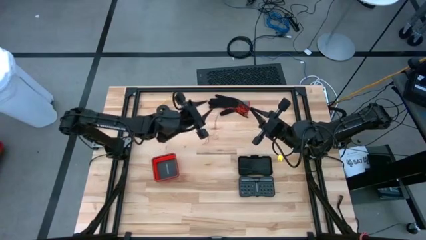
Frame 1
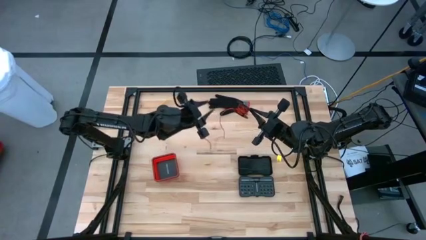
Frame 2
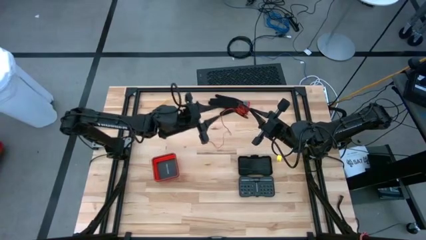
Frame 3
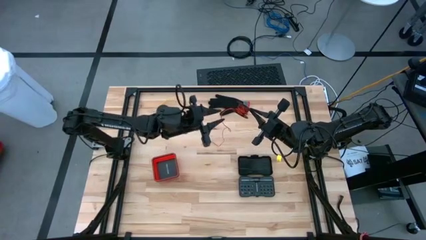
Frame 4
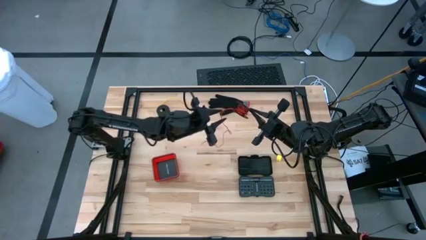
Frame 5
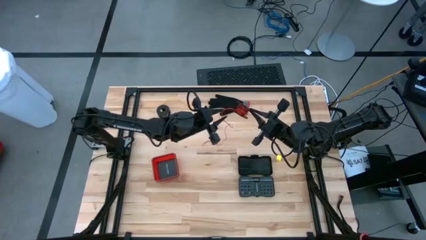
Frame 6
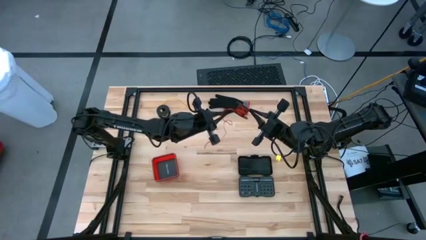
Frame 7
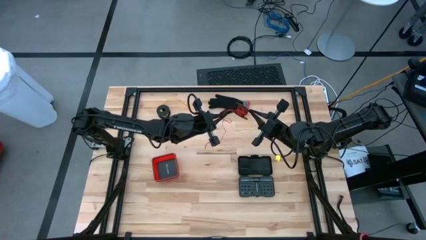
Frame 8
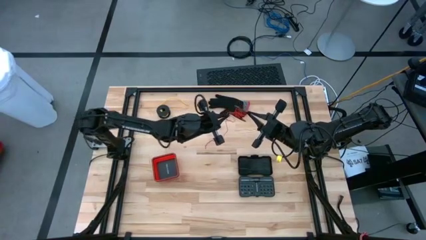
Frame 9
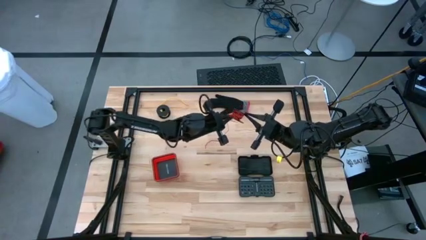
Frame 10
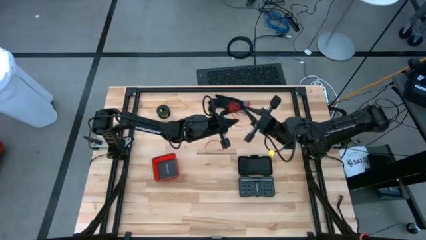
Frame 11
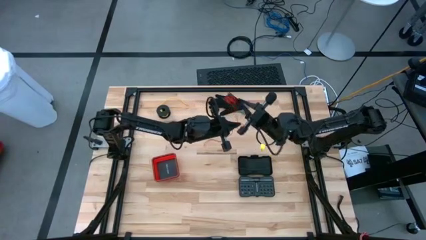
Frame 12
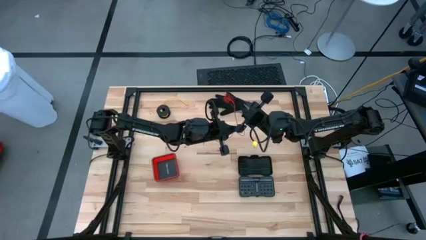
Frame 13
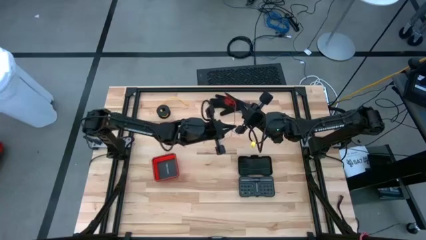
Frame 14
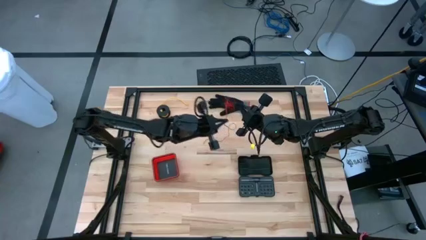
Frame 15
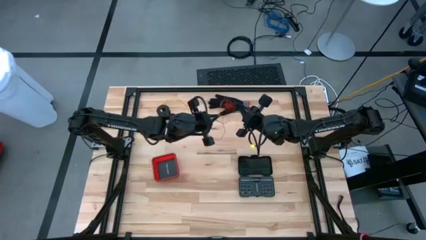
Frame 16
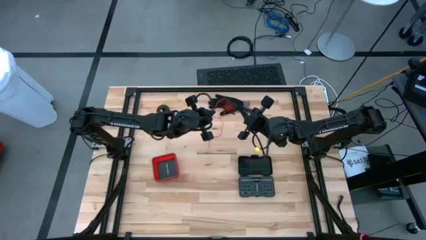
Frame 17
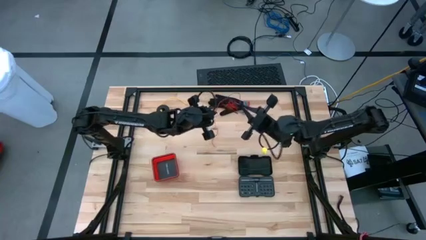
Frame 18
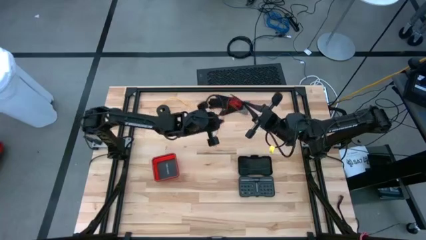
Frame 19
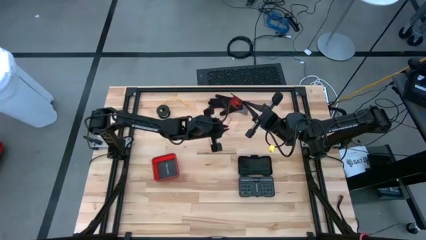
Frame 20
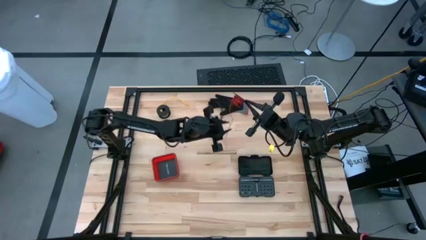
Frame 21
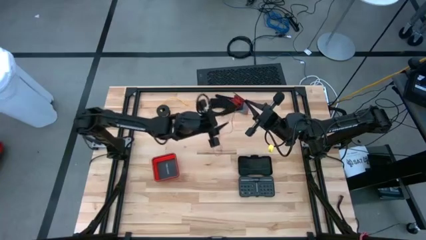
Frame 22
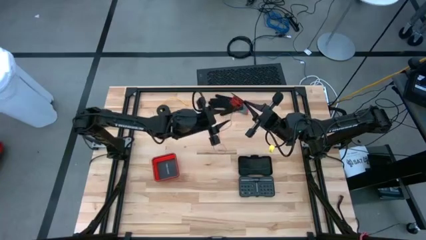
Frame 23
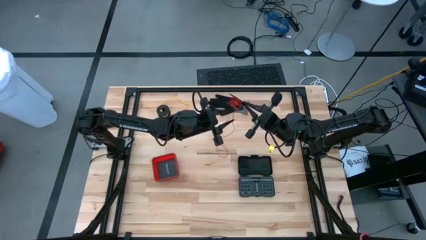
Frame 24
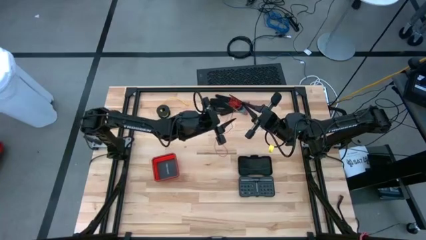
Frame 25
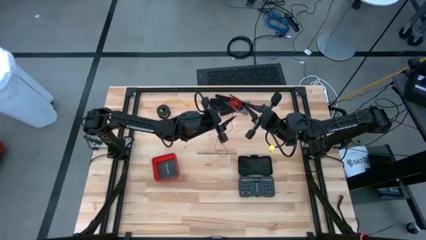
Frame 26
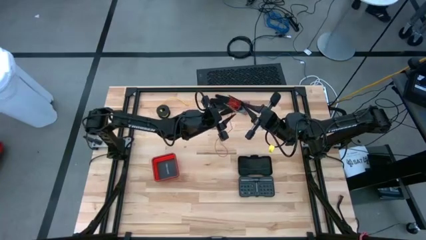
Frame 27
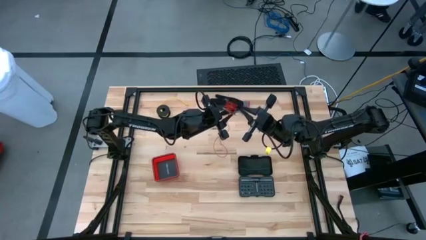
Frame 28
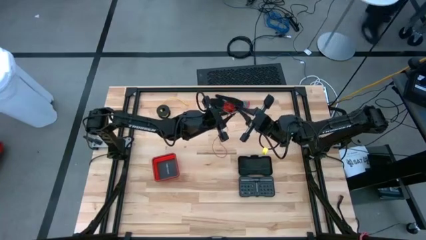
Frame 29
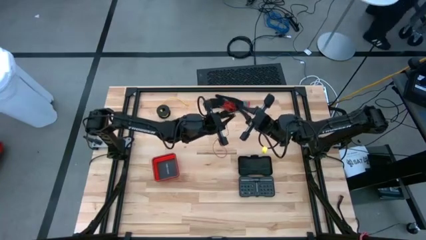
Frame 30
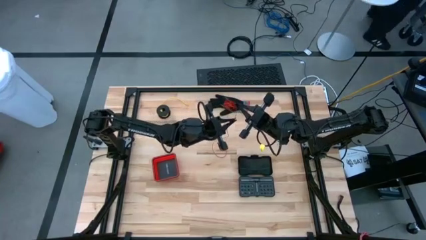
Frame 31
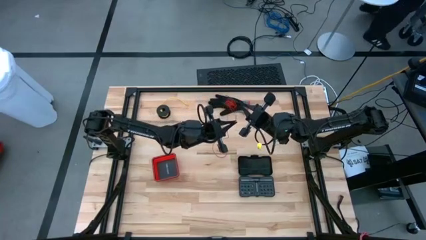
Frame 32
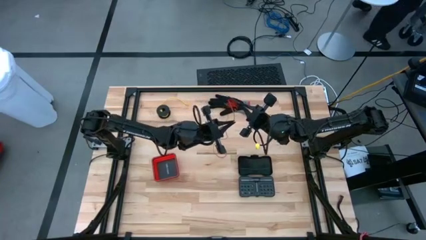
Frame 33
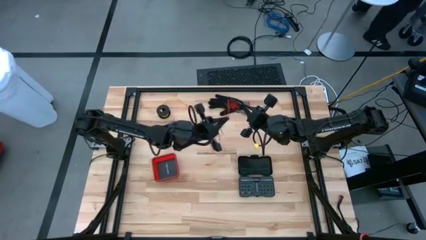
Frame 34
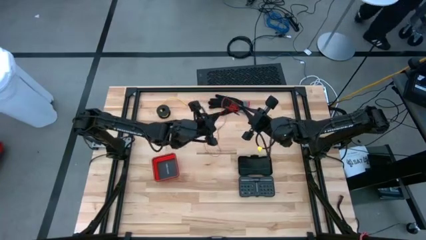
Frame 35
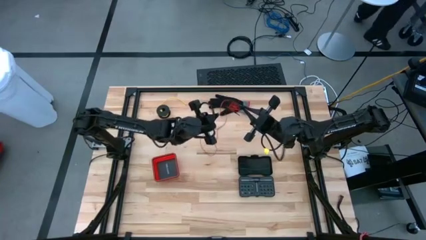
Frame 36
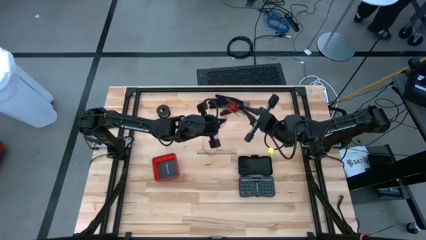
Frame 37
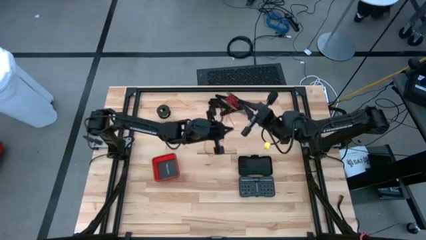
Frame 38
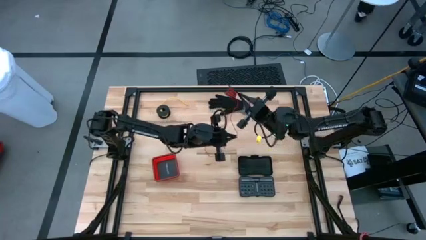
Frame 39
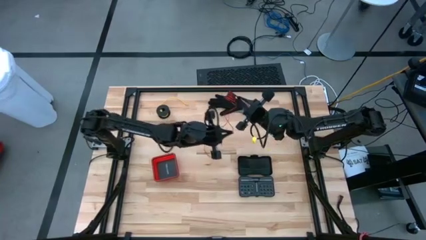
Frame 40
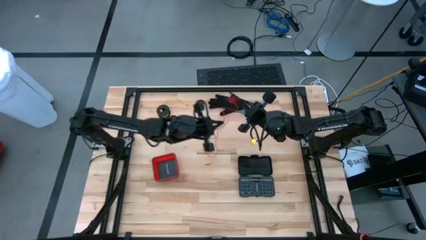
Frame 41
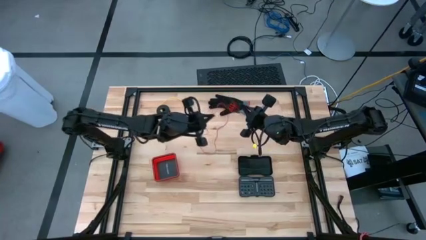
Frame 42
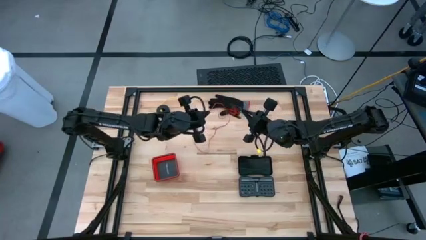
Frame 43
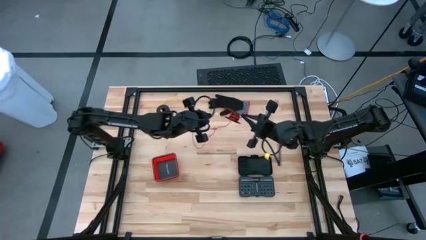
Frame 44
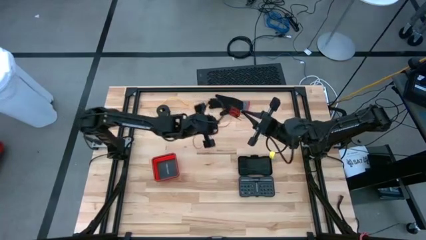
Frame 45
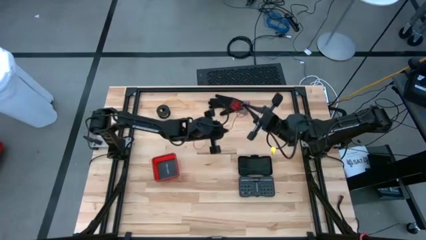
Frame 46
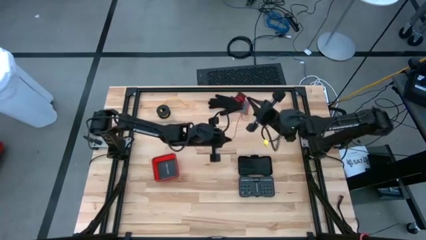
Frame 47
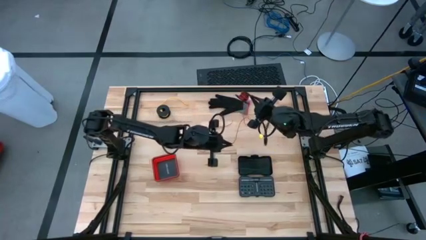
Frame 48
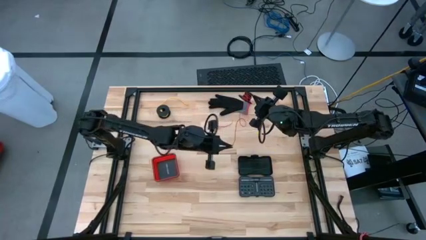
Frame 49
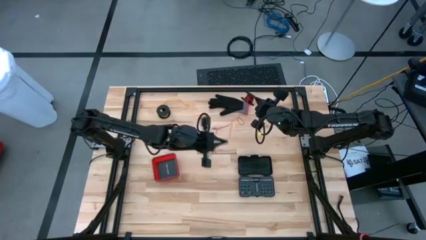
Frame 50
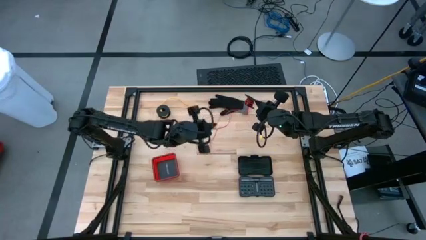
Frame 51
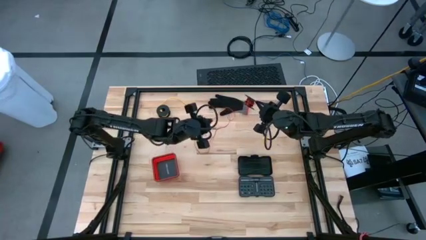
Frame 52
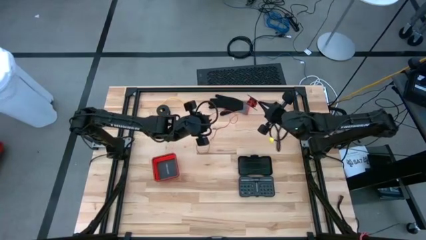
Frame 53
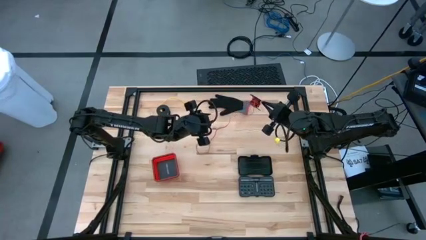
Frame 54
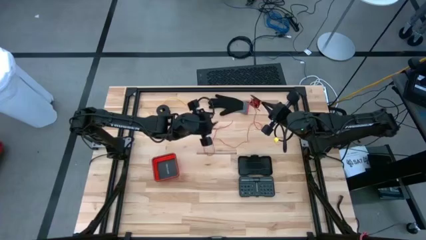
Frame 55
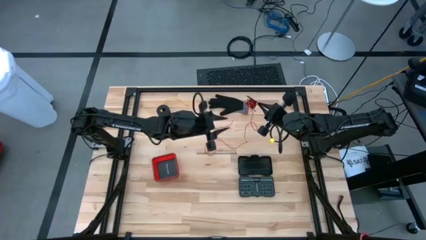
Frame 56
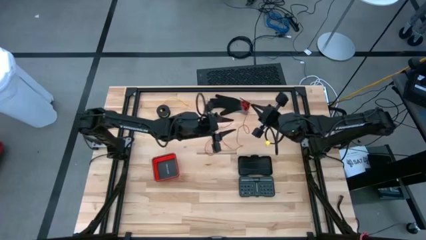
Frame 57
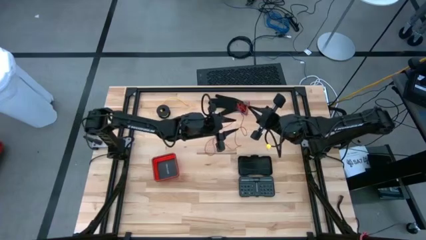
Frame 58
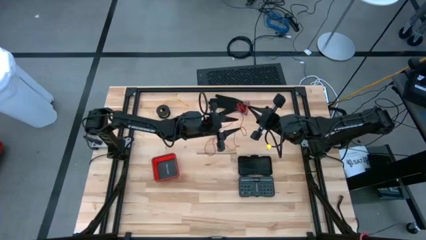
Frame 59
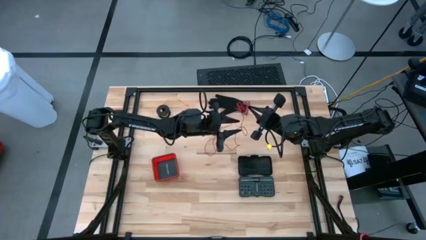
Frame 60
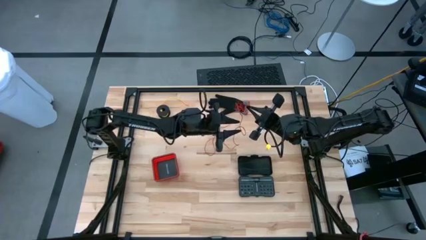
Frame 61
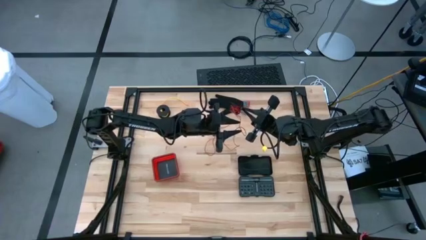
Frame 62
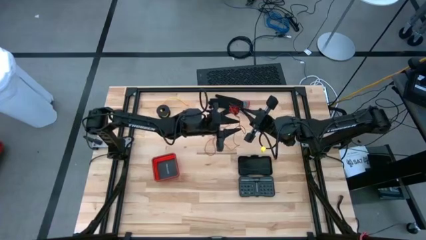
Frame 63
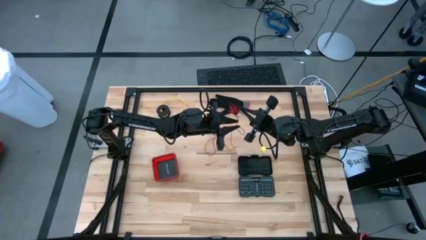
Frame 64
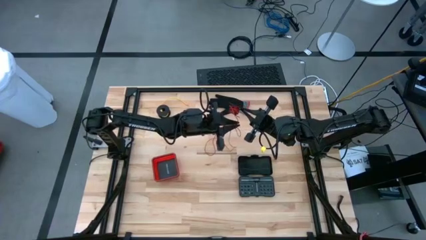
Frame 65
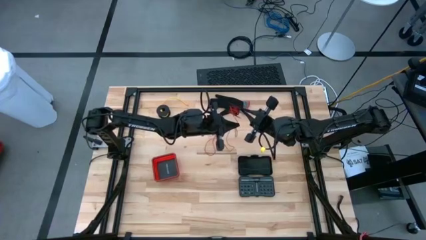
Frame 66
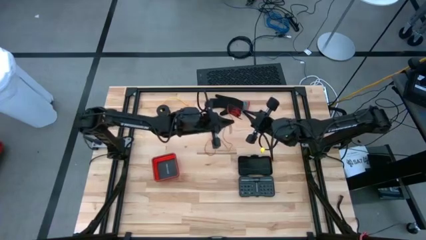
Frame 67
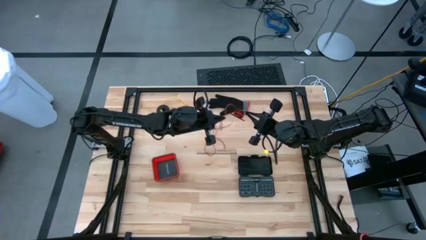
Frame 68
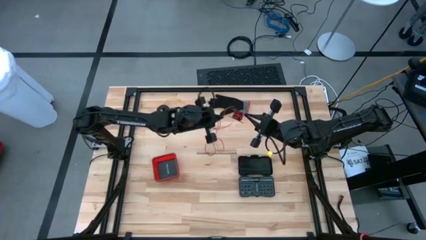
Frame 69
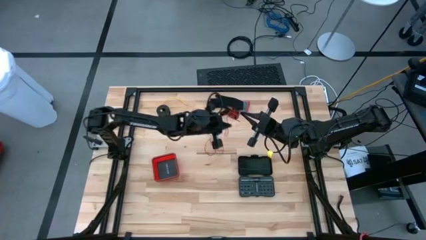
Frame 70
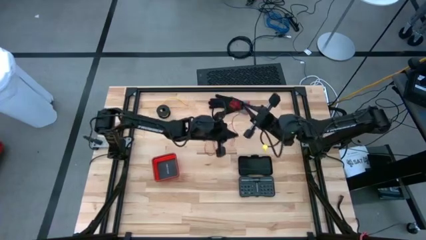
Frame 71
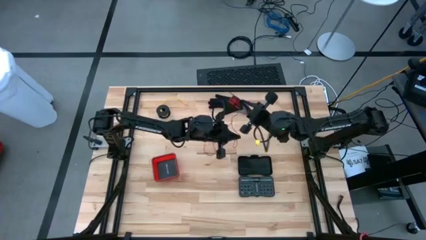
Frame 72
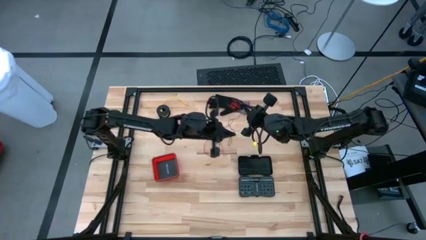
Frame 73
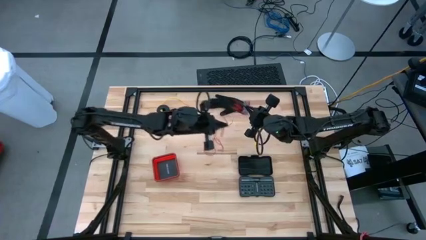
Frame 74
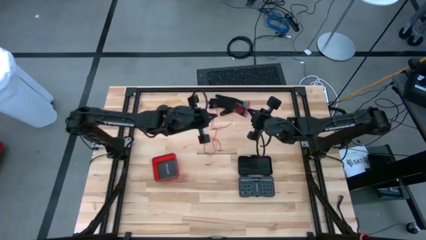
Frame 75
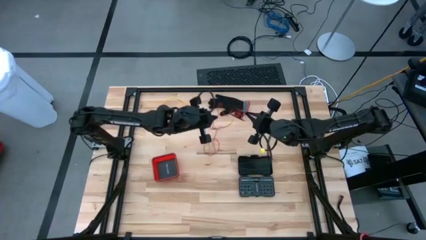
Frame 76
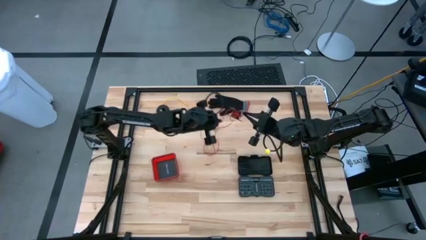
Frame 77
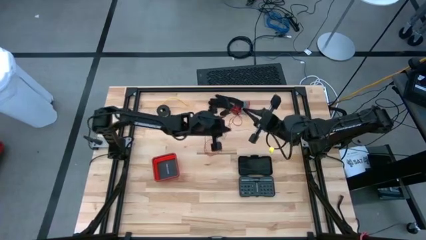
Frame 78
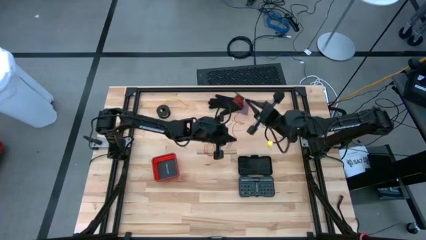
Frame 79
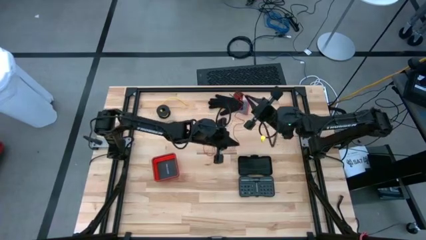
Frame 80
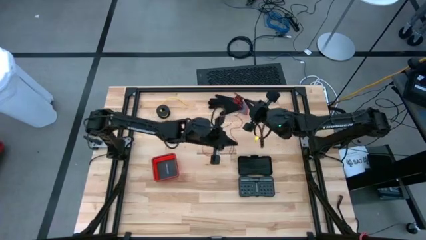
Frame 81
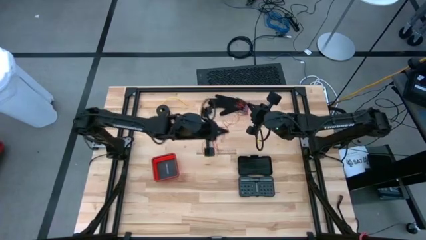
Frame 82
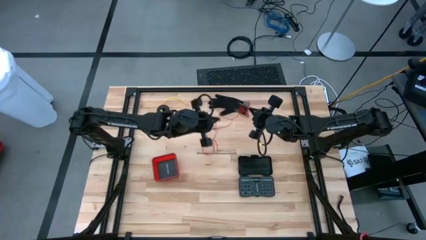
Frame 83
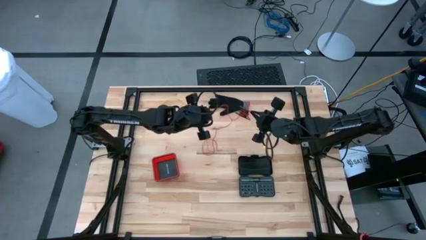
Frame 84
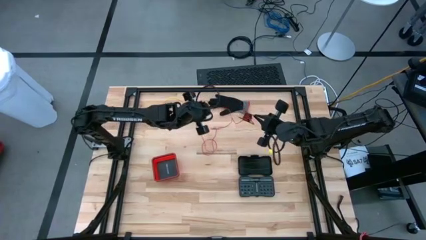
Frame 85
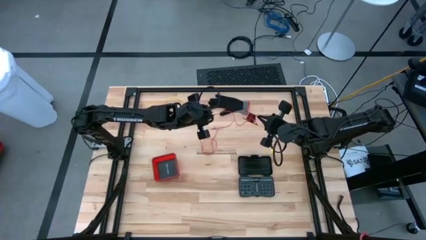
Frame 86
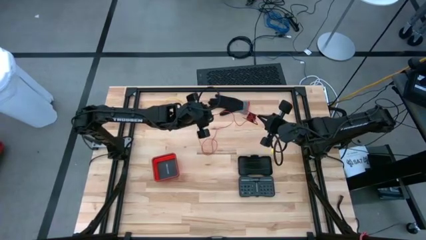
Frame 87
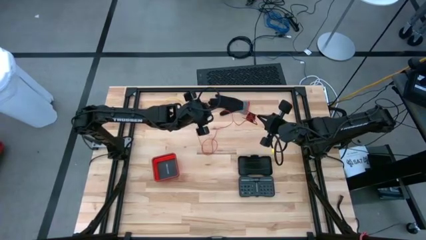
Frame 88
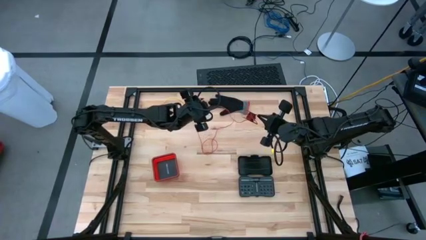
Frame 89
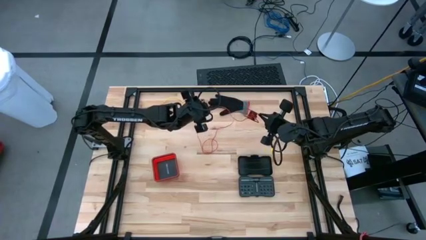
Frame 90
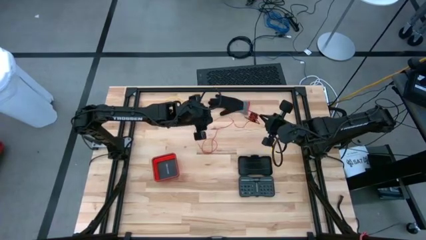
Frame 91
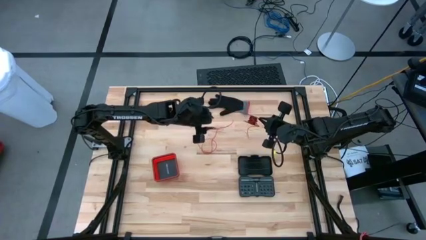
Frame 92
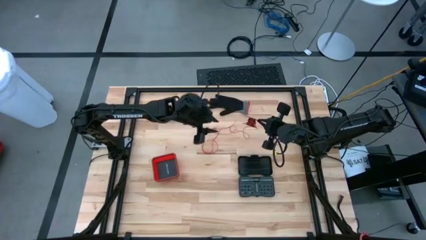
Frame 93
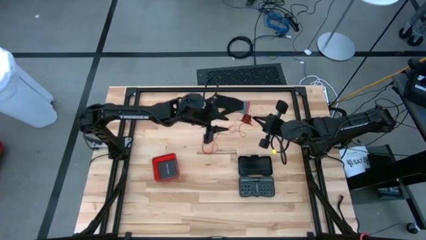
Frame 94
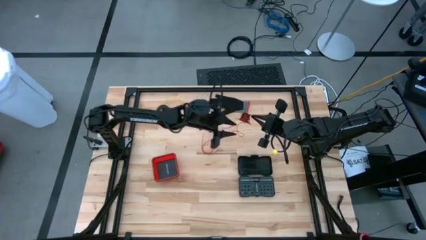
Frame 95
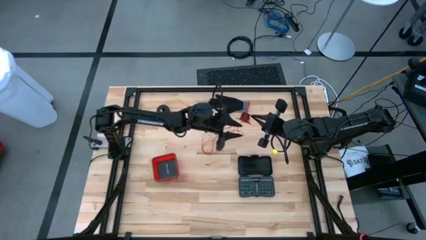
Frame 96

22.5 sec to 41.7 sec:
Task: Coil cords
Uncoil the red wire from the spool
